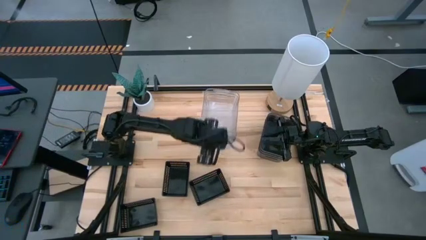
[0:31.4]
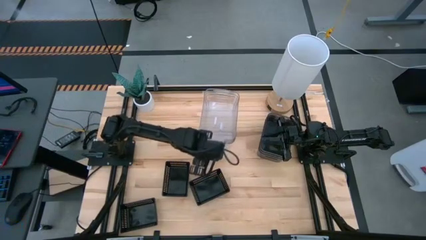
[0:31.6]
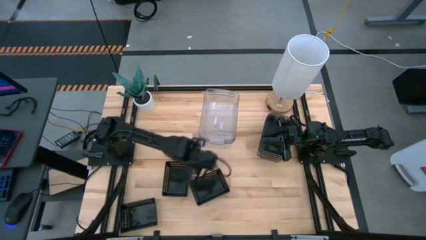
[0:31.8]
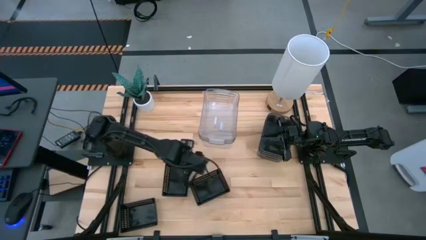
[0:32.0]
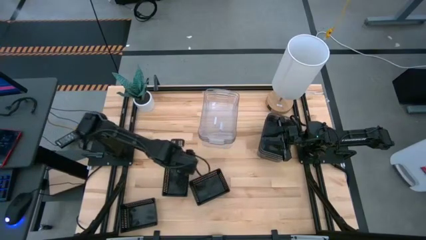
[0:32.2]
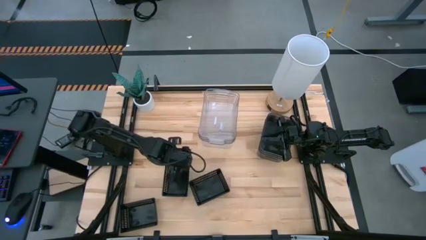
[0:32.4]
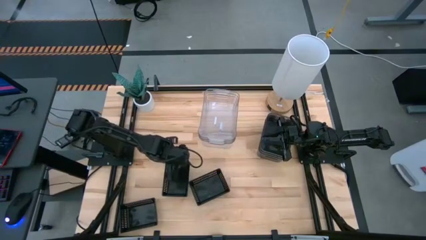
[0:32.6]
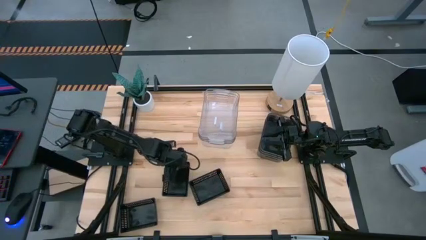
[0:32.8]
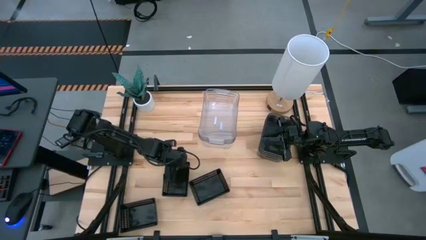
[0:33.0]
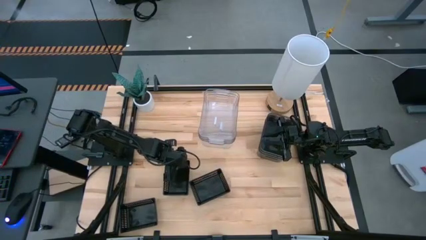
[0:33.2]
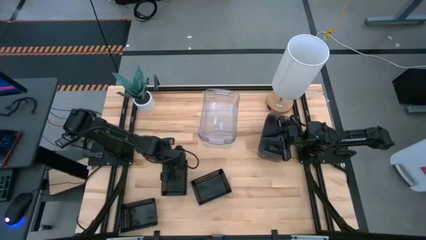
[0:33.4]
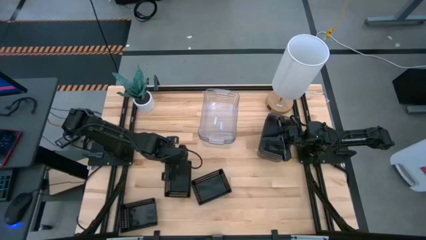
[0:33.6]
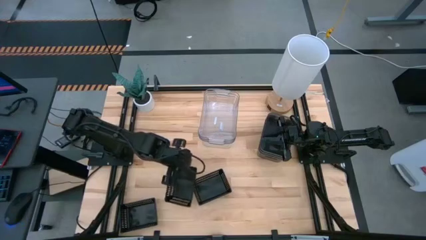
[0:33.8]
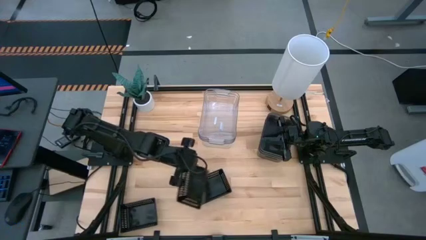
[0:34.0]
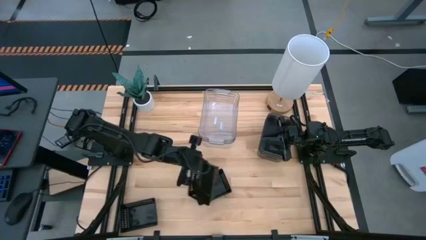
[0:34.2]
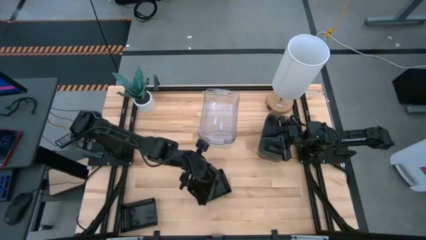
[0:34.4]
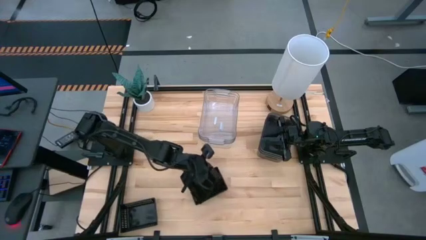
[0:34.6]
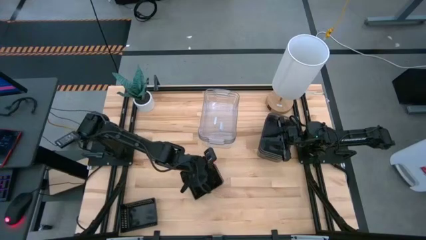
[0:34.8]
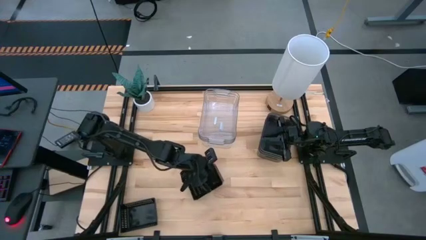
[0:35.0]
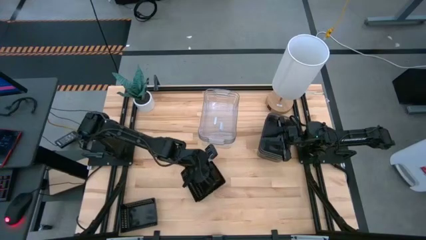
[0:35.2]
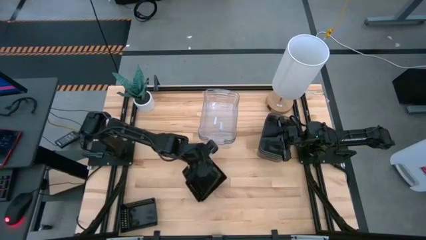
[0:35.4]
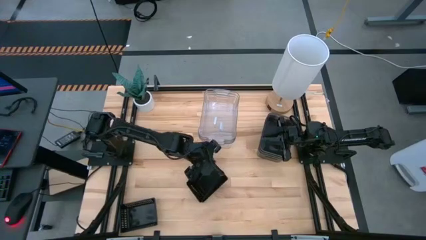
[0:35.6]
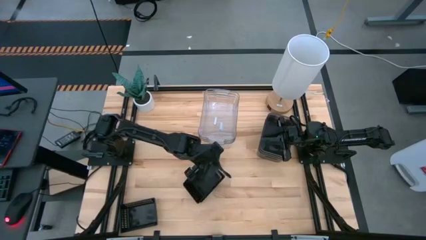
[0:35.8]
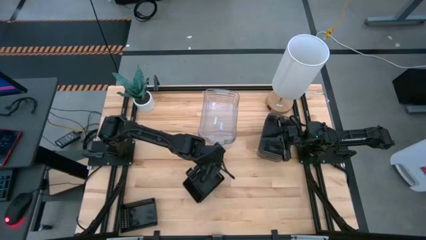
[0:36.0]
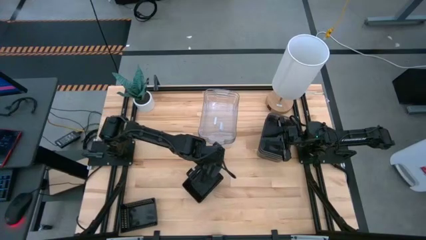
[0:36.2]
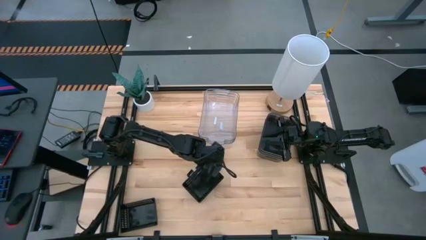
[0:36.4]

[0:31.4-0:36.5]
Stack the top left black bin on the top black bin

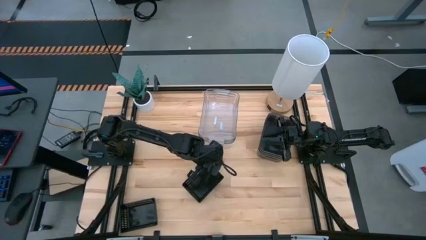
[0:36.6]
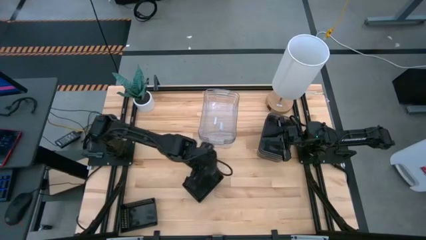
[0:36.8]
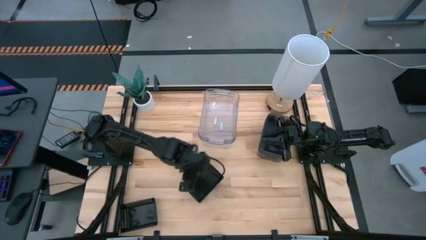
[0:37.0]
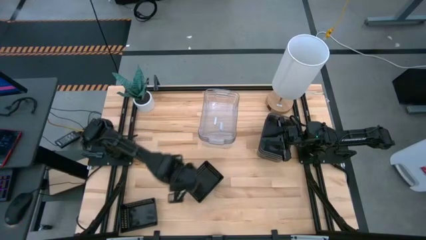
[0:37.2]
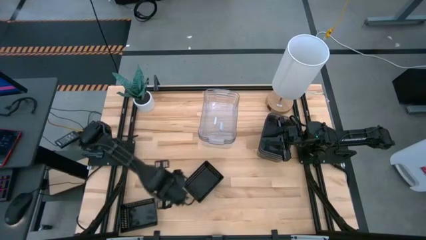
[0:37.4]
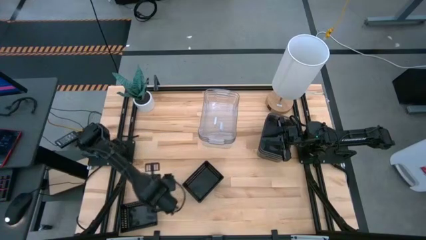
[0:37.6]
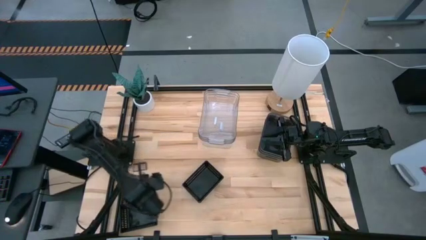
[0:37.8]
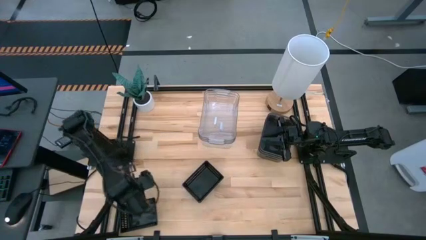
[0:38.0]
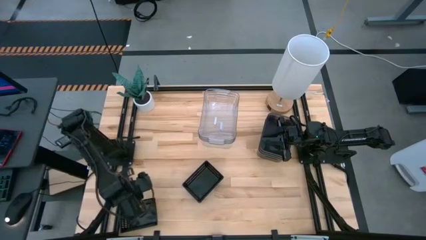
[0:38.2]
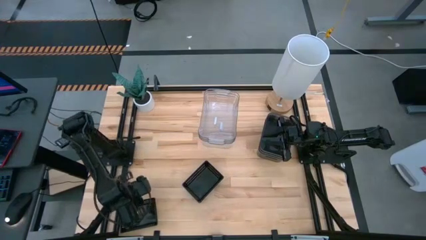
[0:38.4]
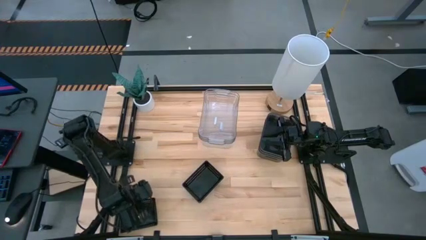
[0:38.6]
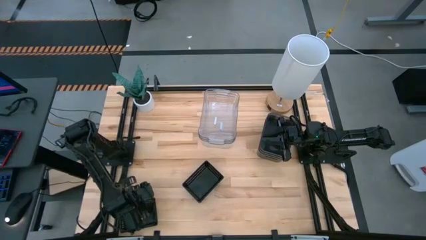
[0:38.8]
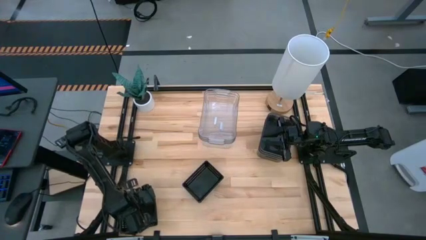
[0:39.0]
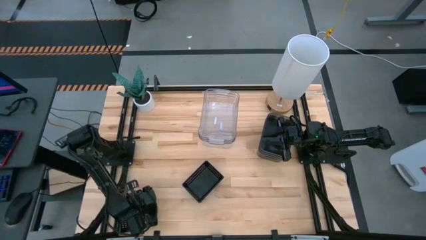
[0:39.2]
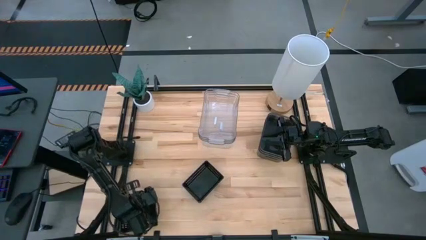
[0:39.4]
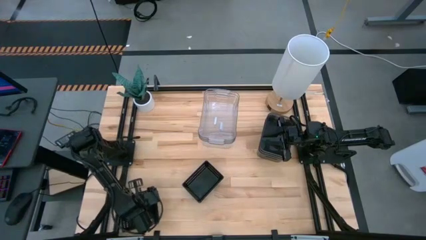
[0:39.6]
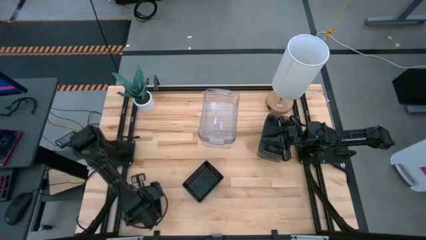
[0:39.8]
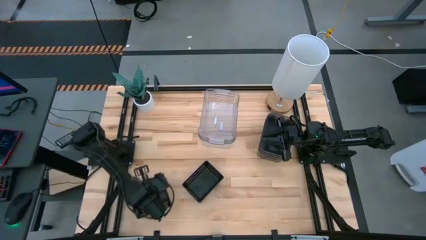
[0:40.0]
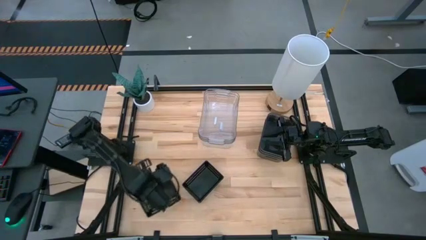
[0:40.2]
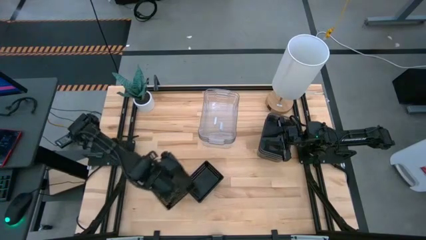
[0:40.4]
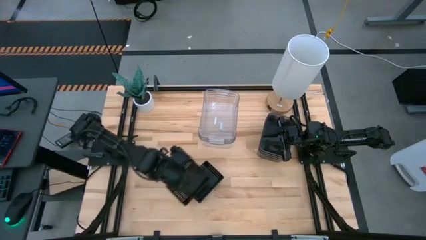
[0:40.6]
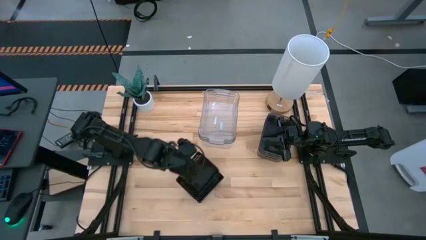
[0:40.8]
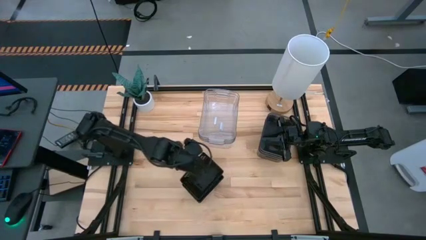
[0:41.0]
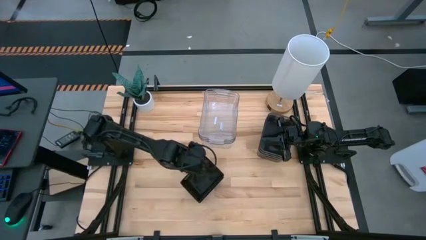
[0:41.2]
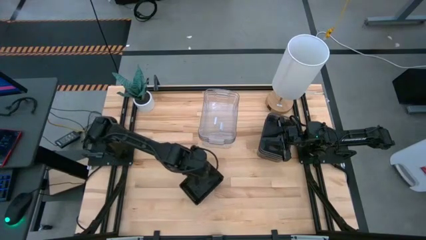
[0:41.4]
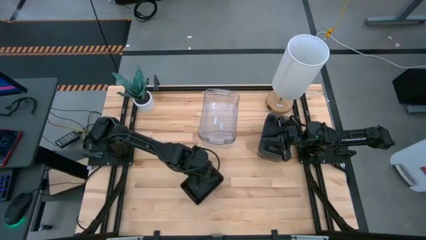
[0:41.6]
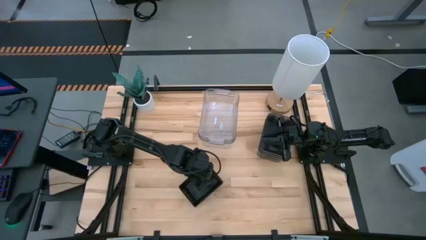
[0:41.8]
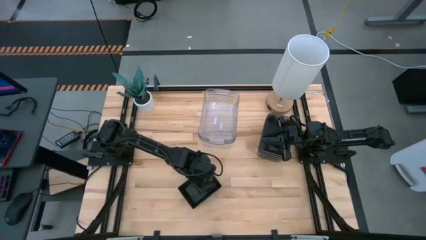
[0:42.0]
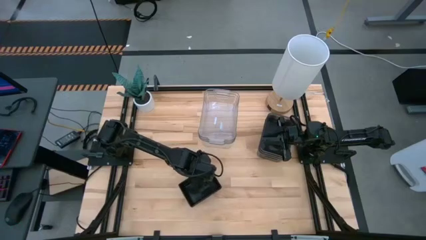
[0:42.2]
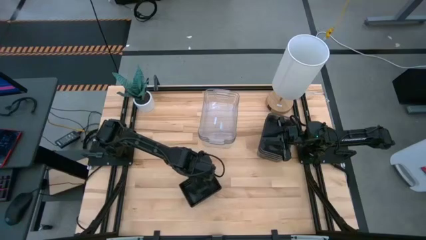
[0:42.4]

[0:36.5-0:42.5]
Stack the bottom black bin on the black bins

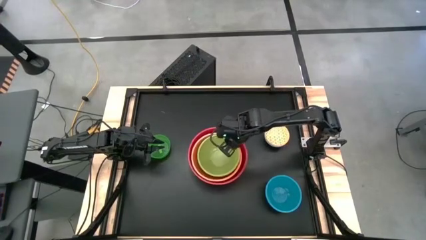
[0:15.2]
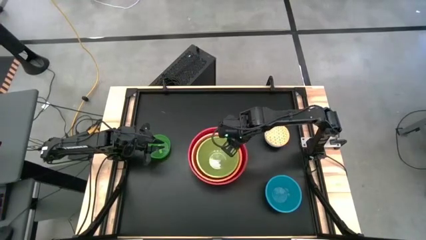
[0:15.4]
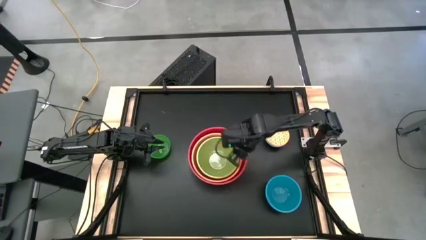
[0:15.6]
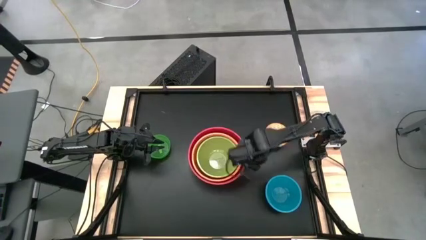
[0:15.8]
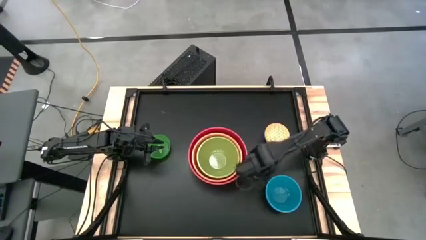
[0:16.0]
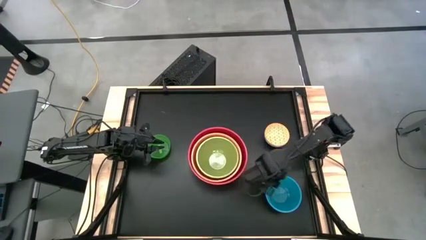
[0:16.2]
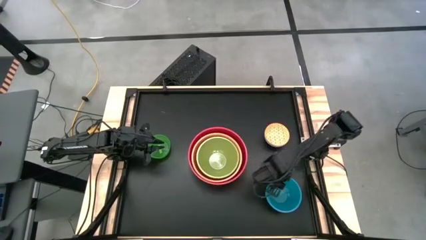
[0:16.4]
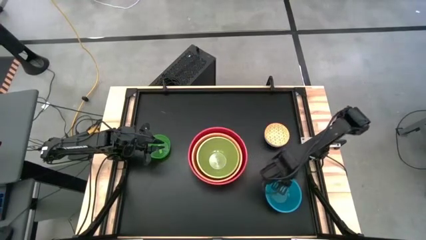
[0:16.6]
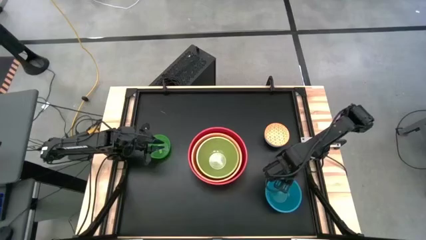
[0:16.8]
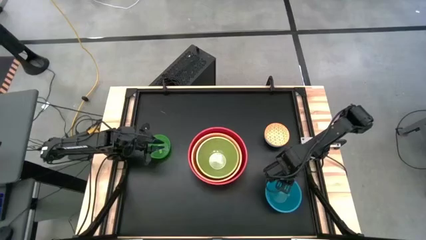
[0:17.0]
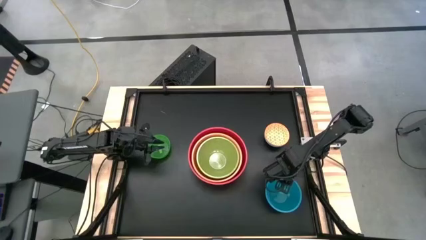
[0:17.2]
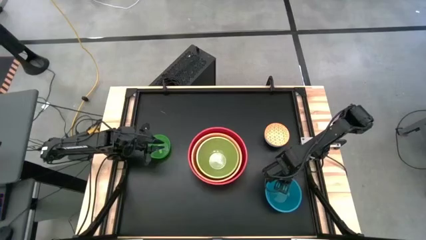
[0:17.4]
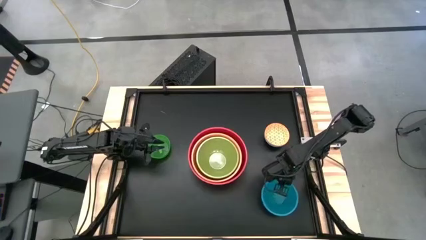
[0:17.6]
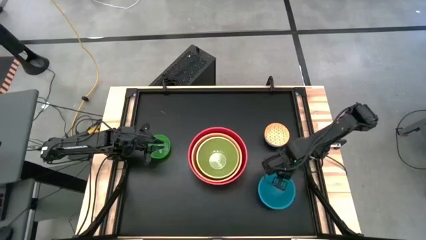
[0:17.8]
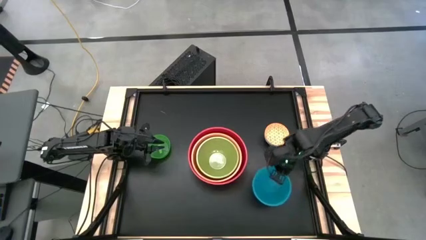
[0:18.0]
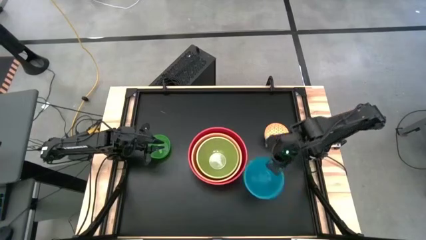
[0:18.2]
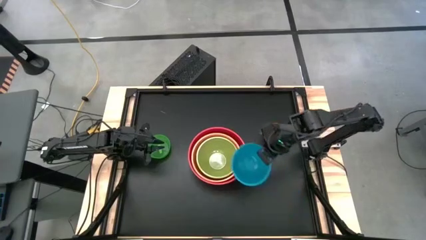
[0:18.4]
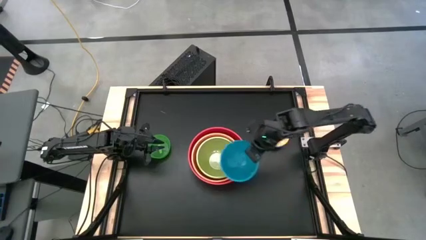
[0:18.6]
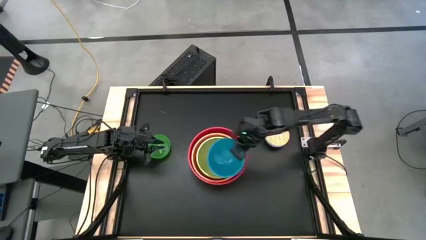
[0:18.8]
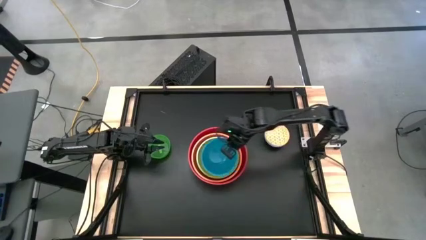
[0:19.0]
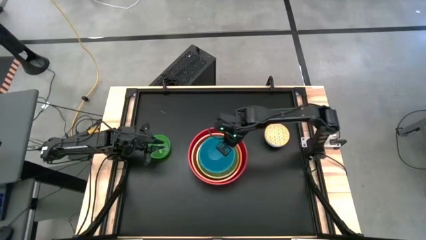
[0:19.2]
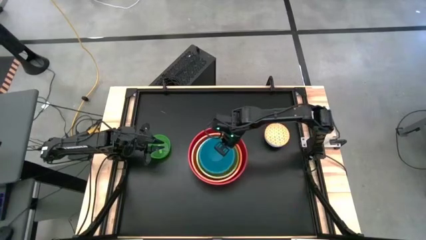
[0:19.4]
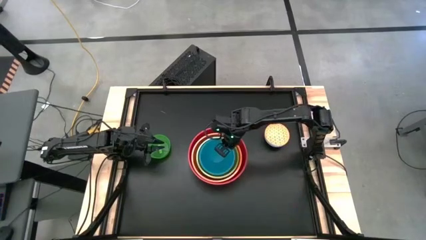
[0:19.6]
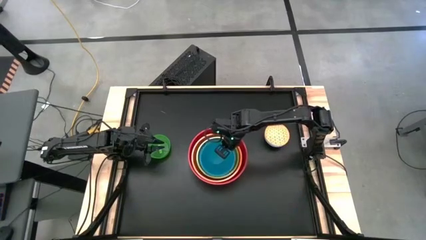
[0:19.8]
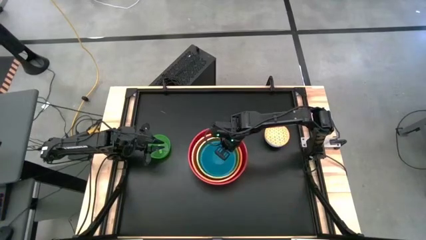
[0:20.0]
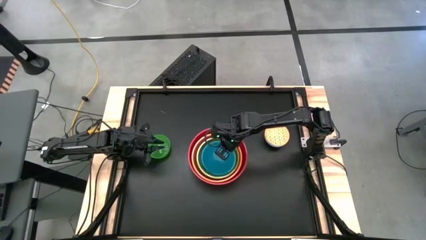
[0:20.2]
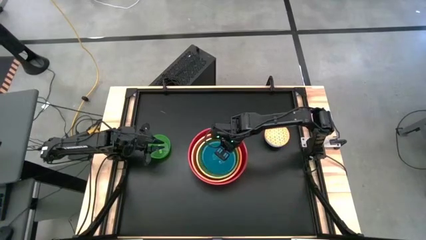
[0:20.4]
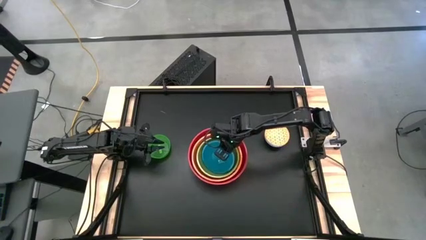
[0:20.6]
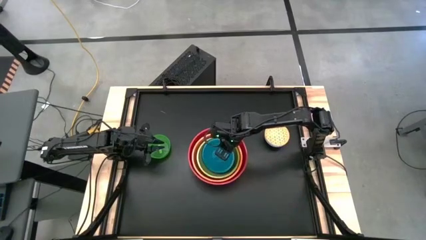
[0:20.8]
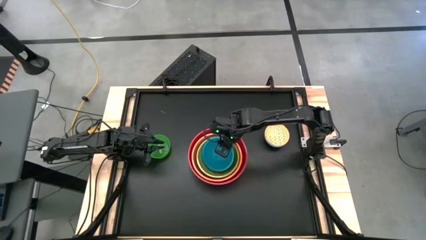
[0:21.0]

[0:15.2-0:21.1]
Stack the blue bowl on top of the light green bowl
